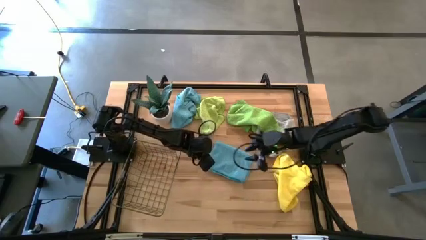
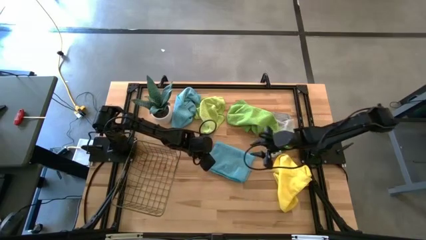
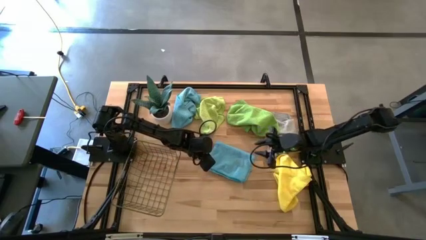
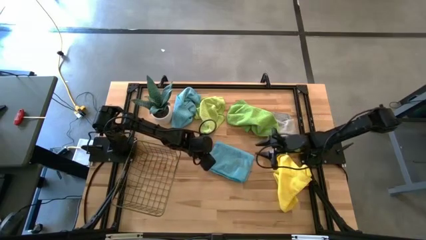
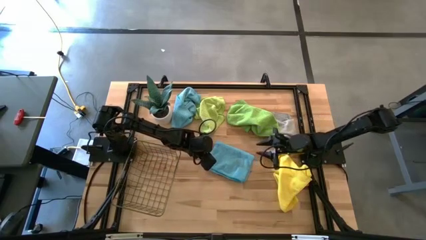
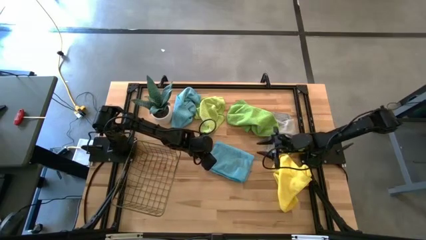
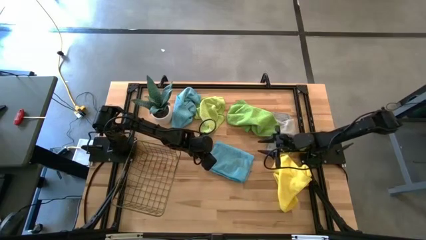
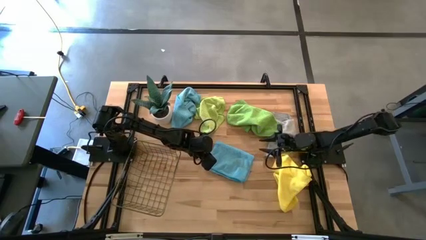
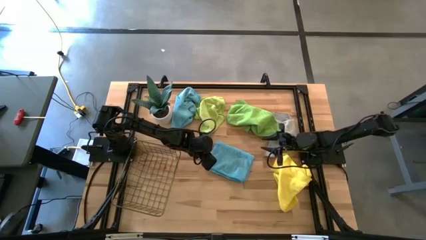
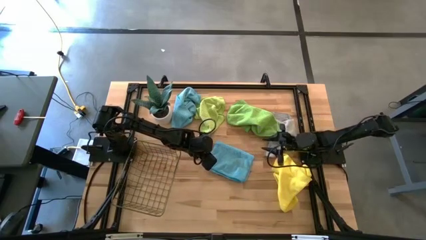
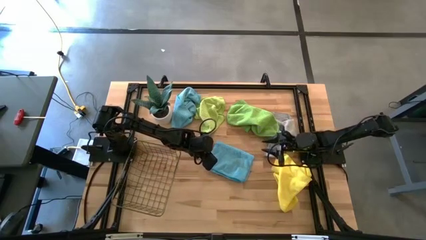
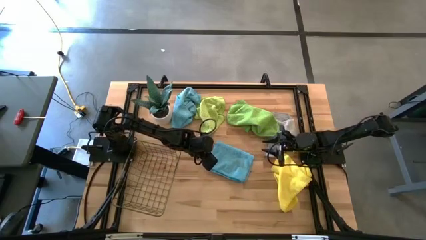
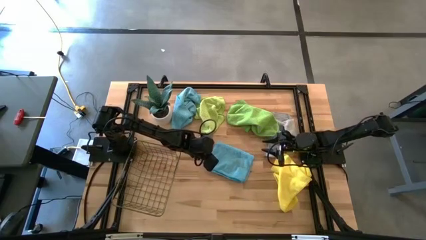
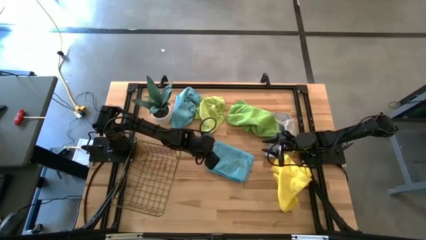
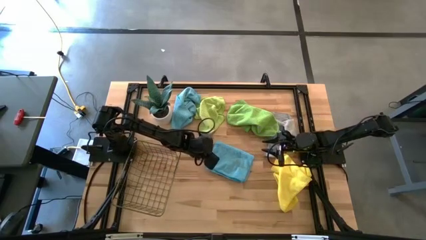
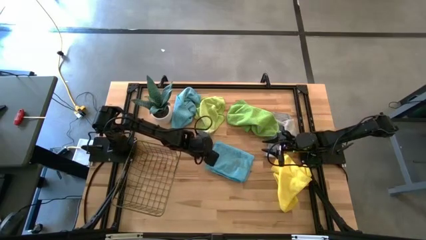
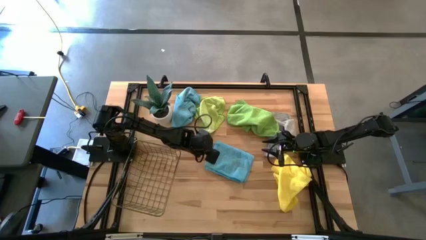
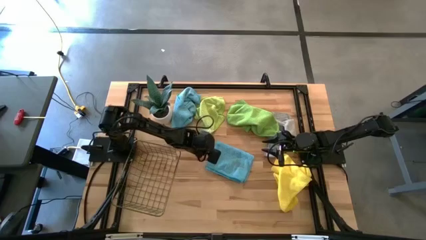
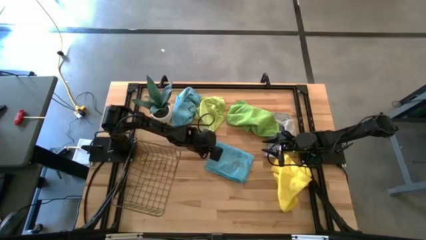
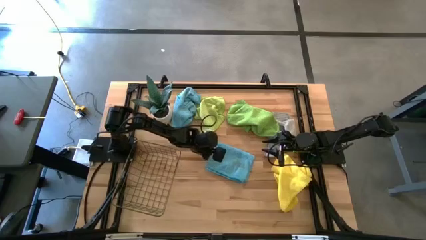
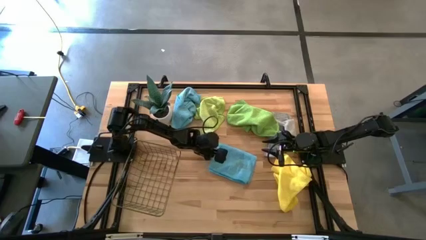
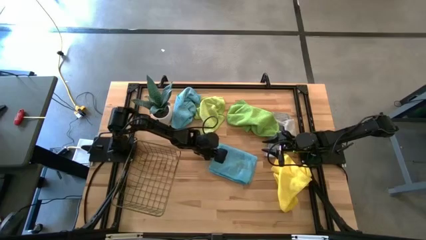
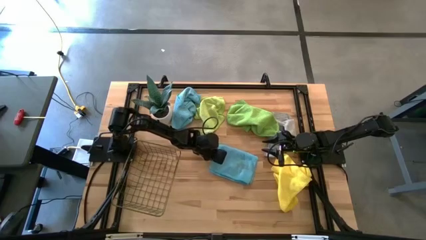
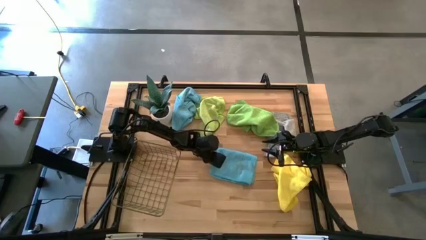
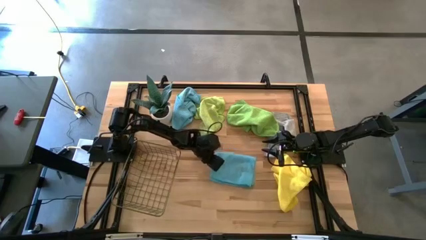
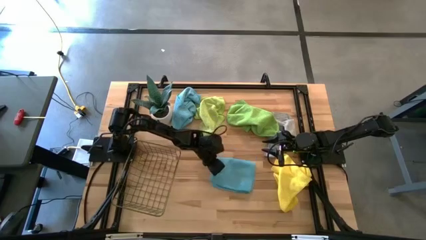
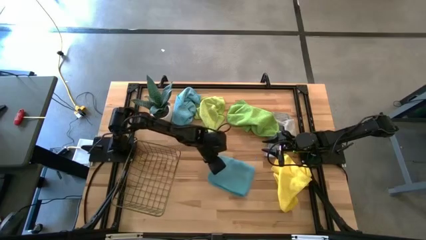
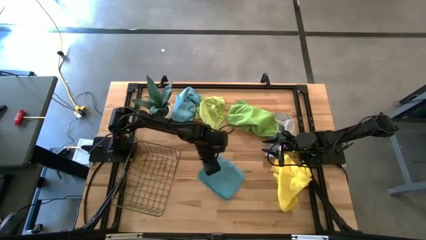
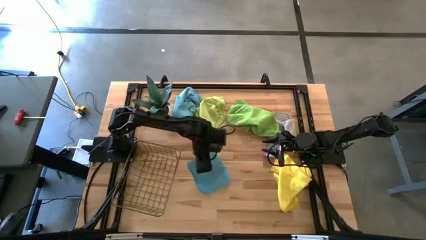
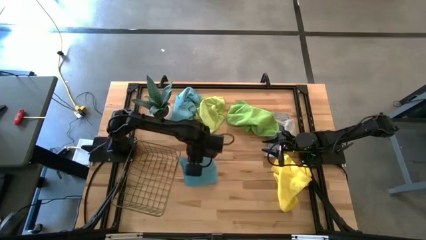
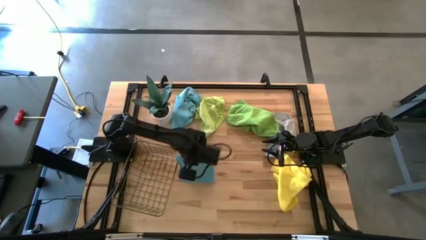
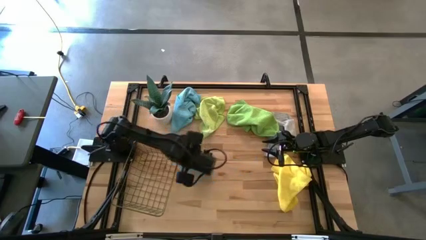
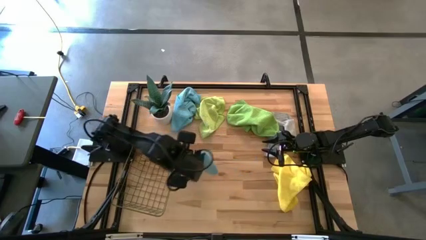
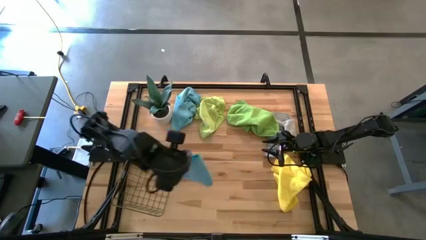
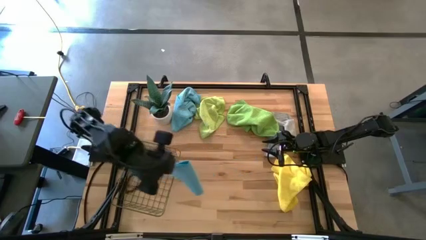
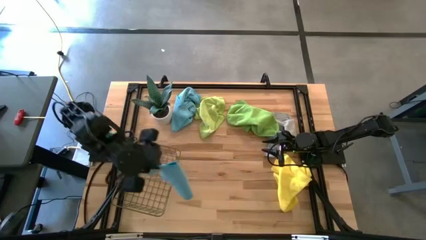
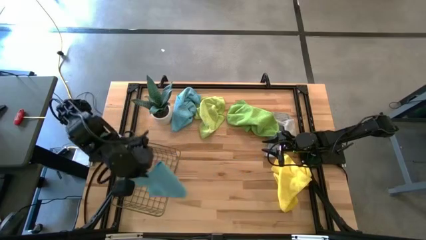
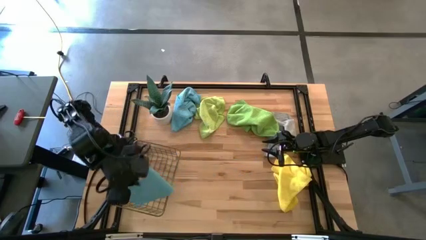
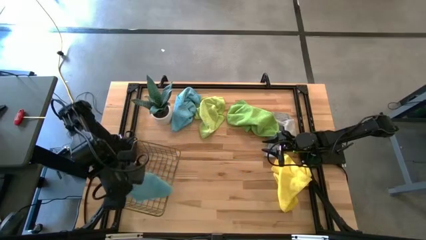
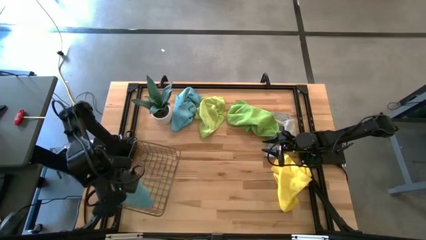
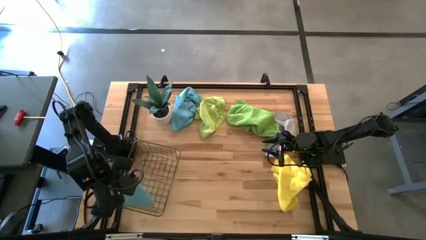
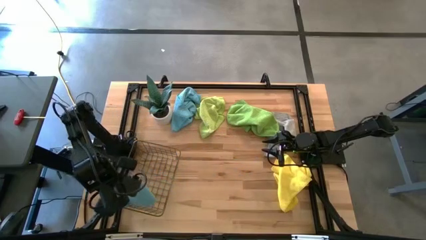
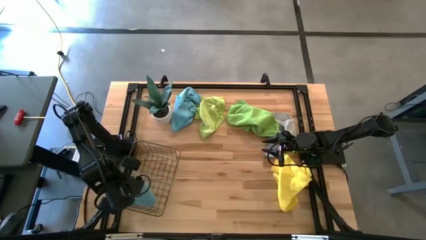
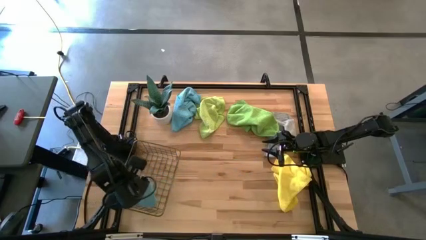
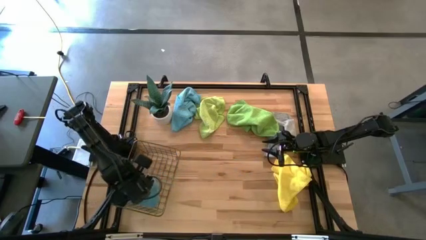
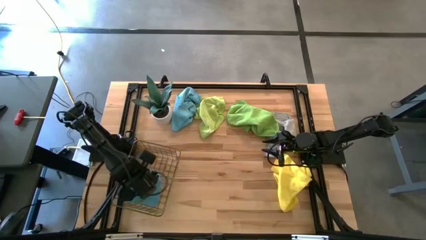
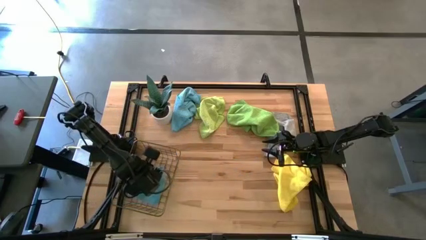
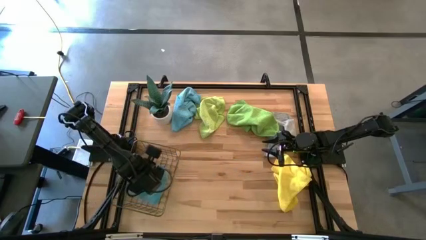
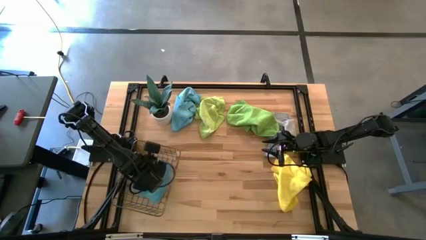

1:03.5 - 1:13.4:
Task: Fold microfiber towels
Put the bottom blue microfiber towel into the wire basket

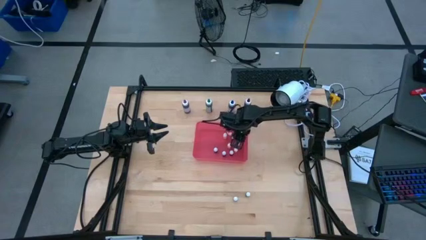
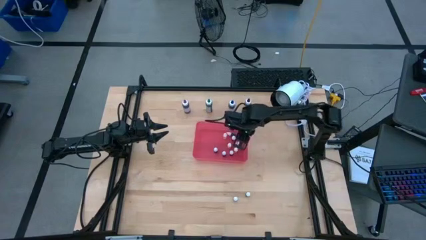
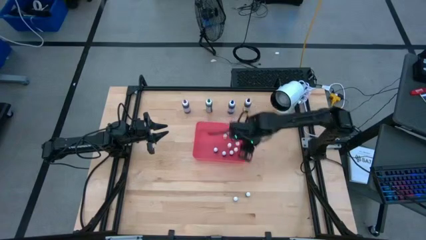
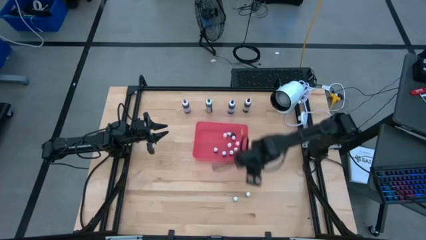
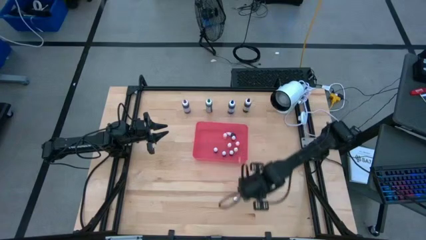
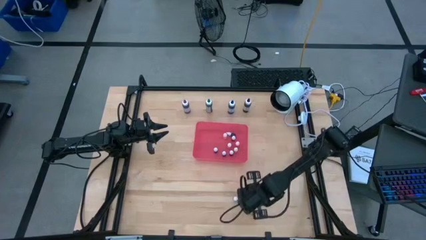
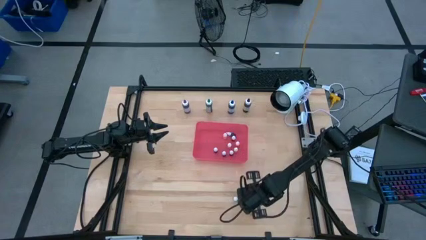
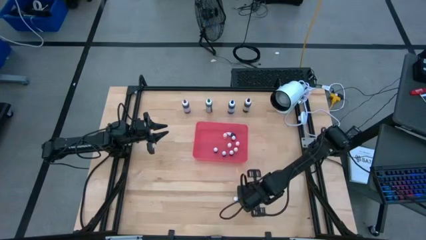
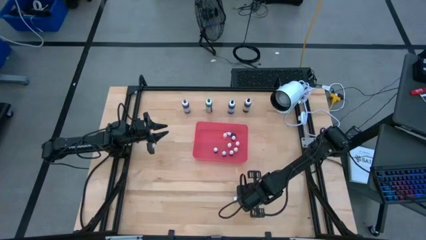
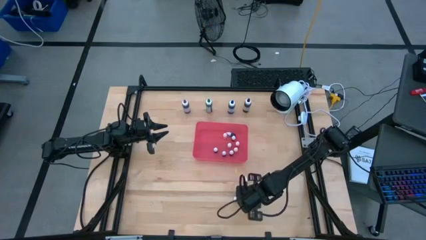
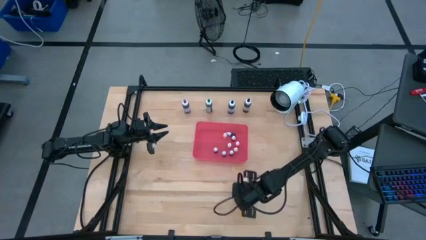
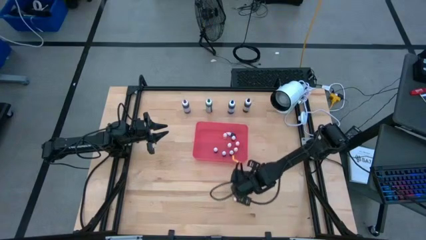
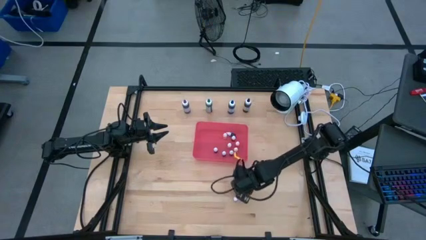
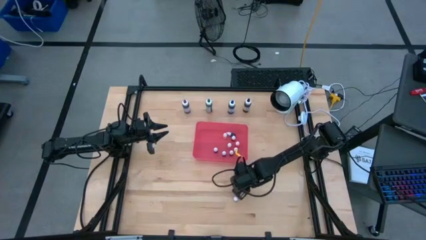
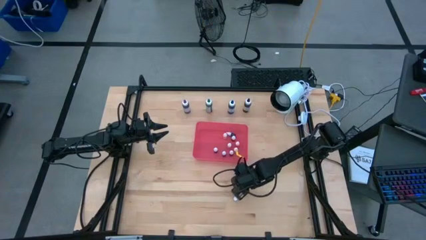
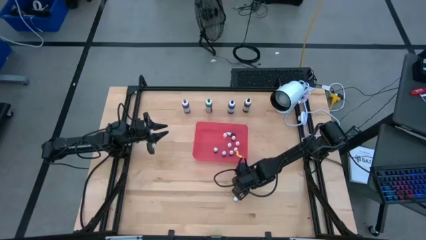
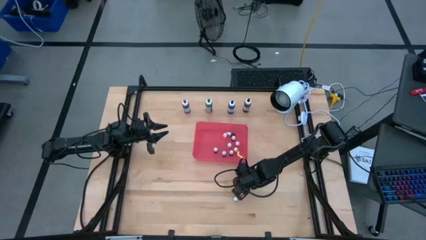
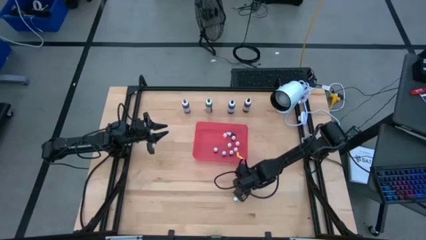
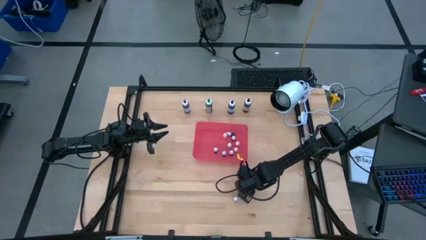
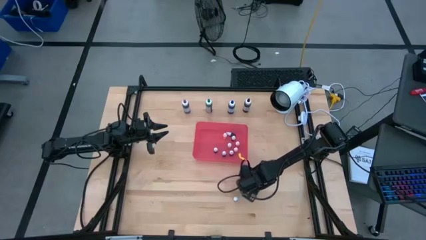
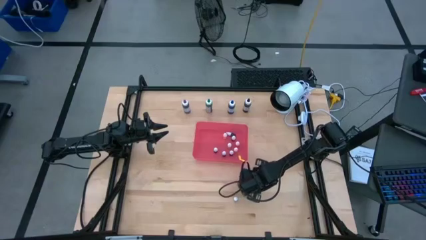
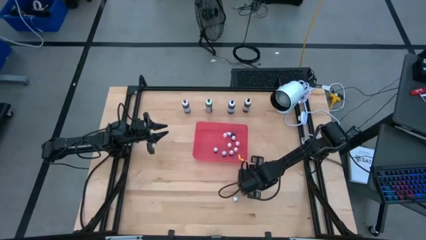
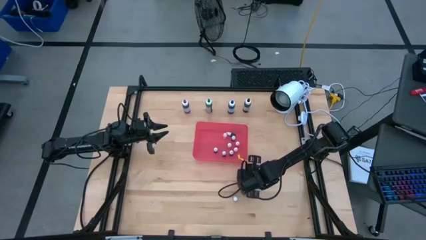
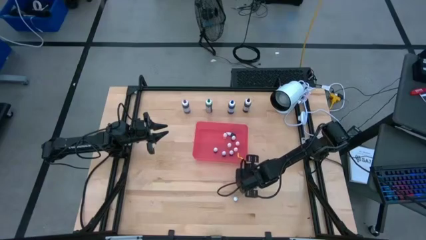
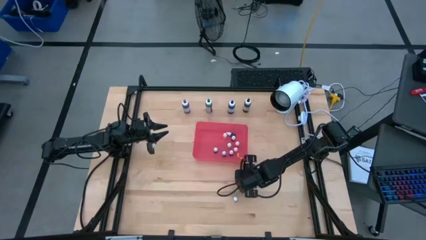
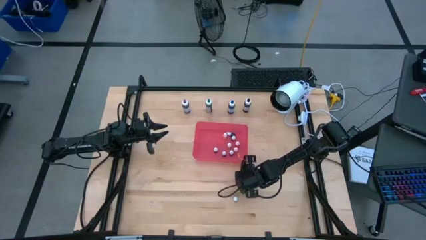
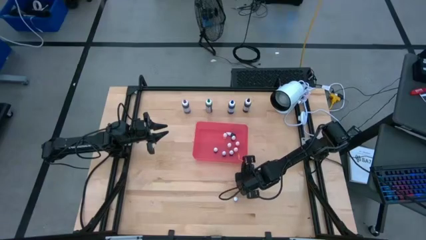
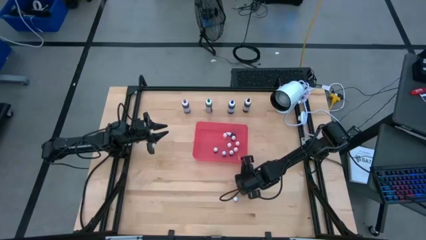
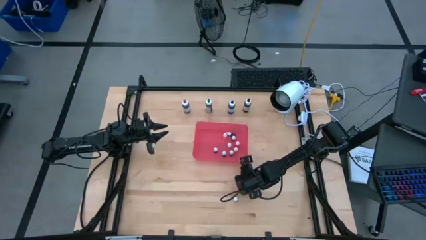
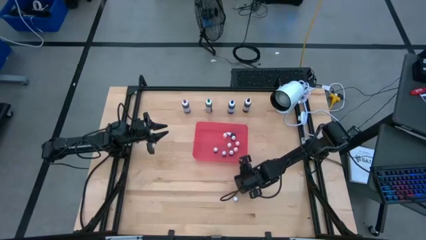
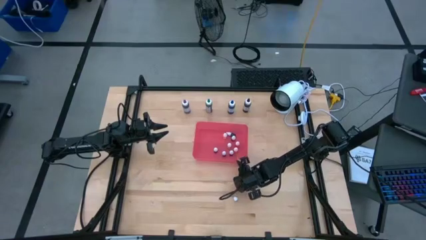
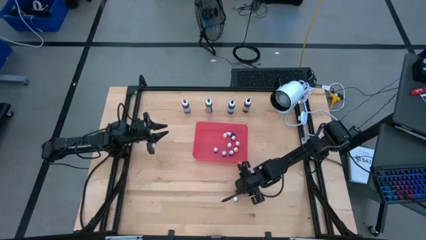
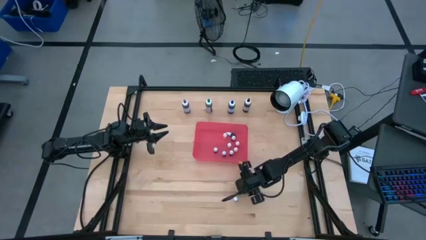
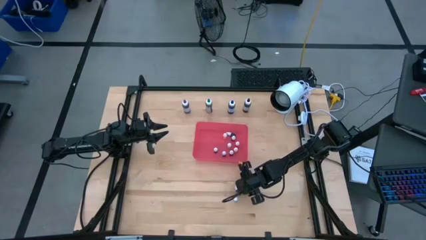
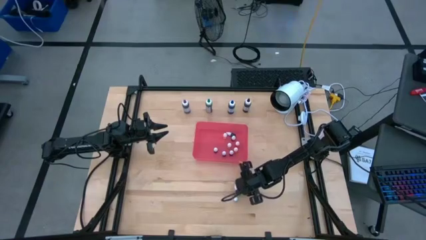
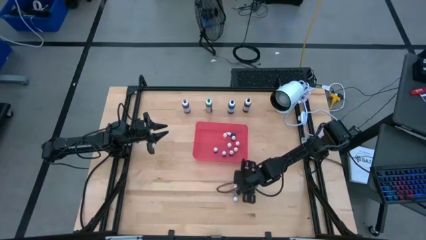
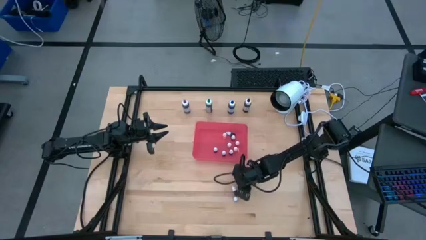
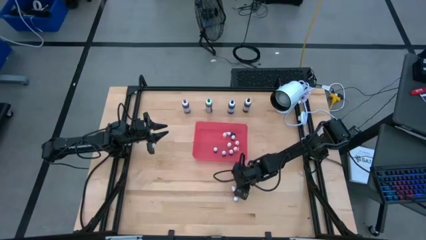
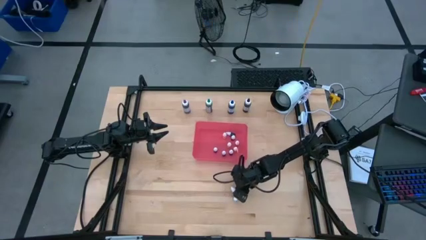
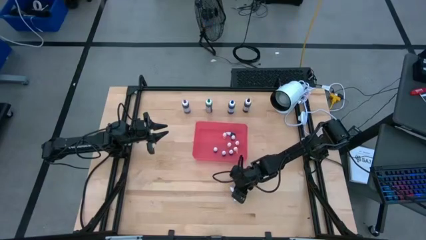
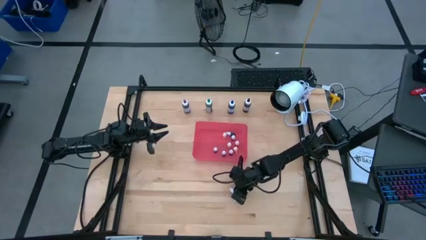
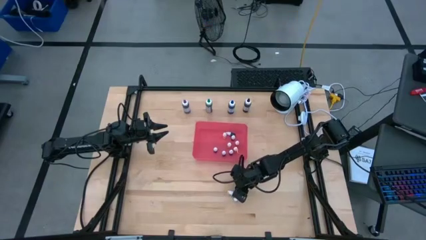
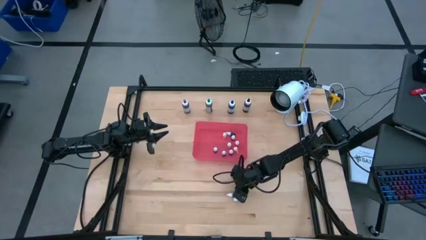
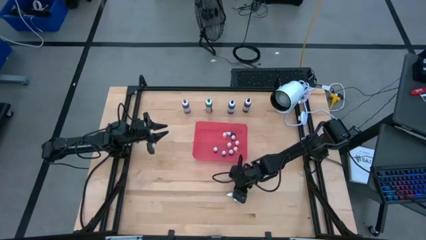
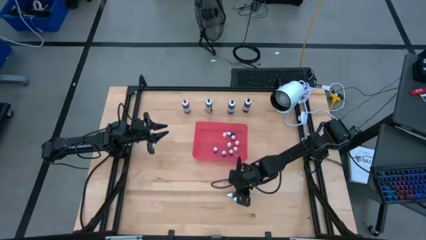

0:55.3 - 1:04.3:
Task: Pick & Place food coloring
Put the small red food coloring bottle into the red bin
